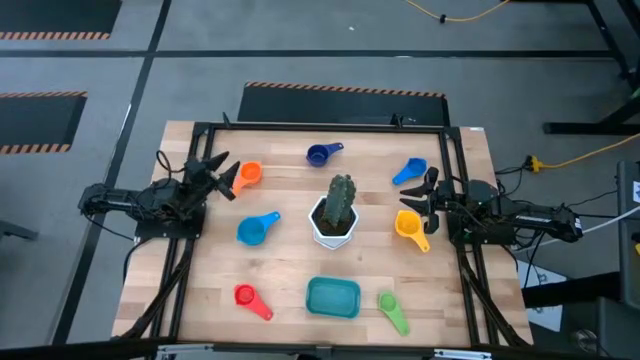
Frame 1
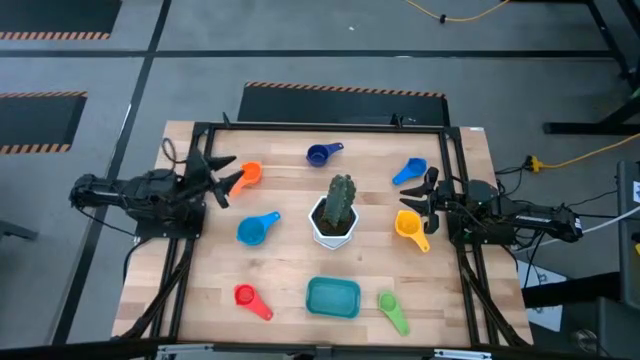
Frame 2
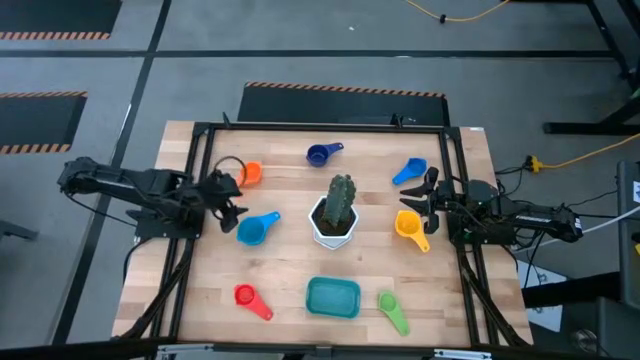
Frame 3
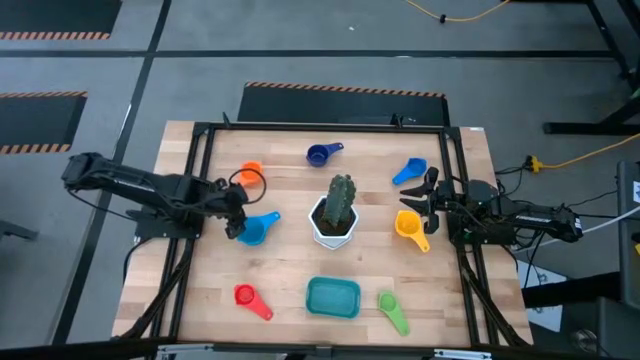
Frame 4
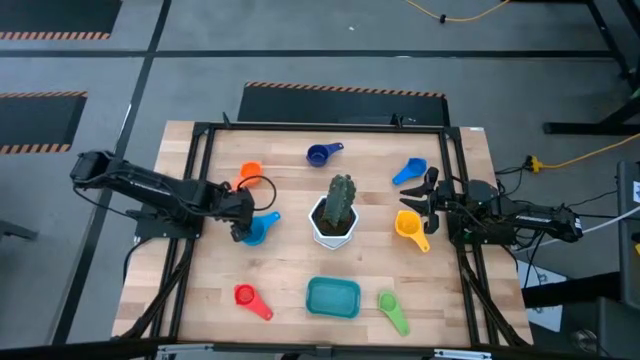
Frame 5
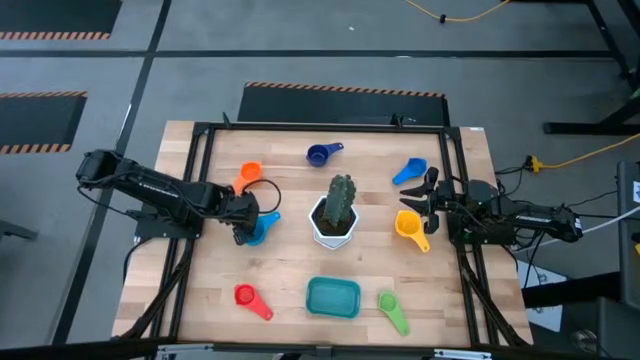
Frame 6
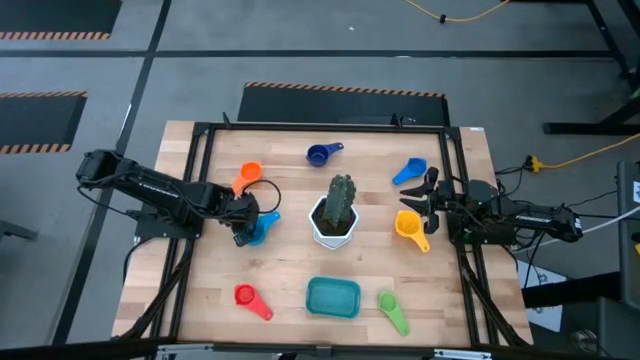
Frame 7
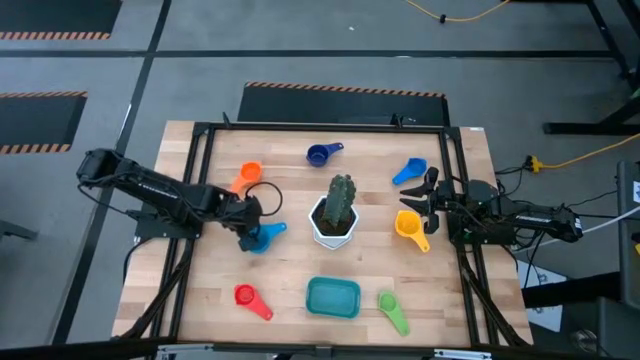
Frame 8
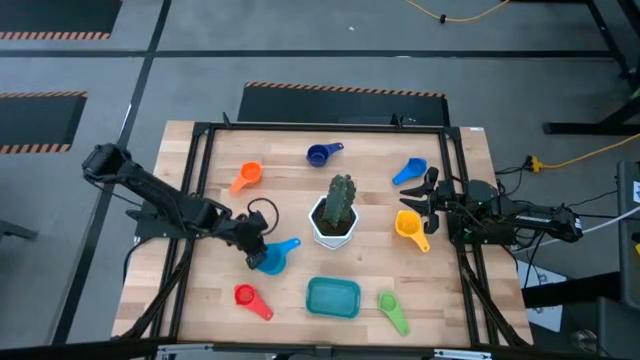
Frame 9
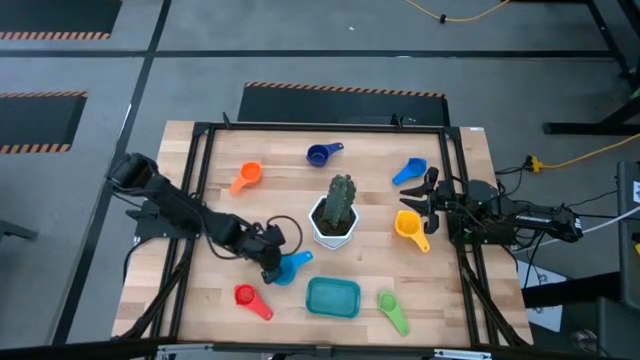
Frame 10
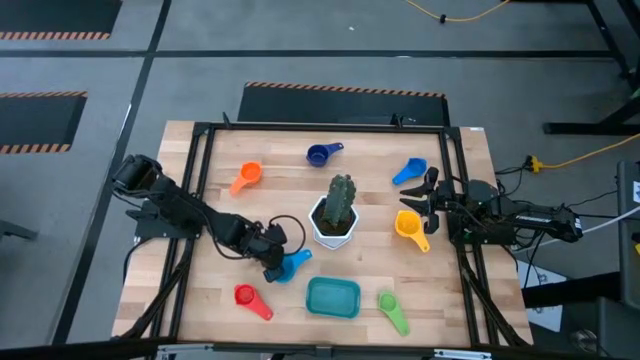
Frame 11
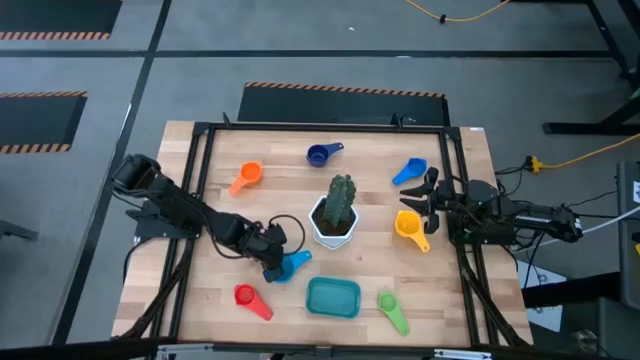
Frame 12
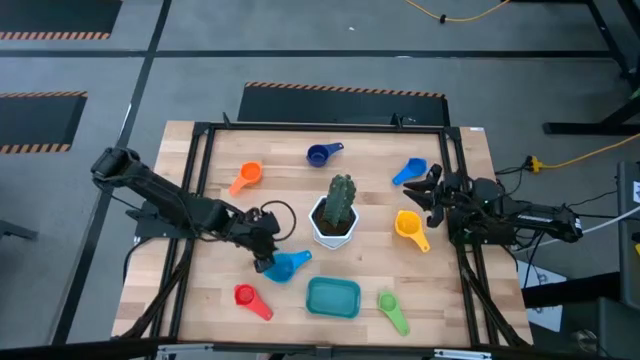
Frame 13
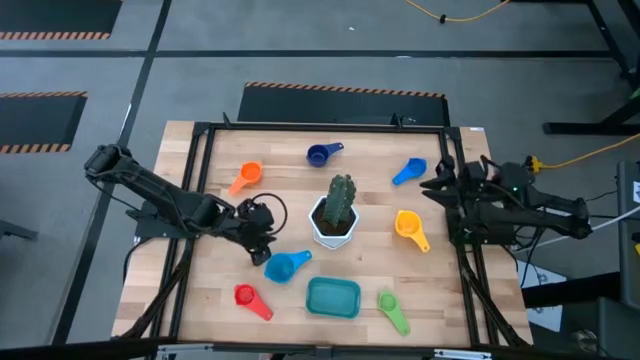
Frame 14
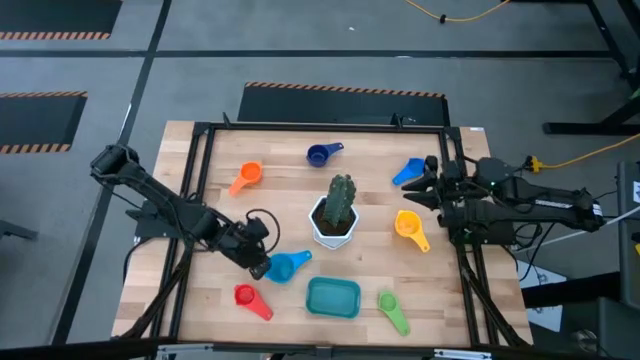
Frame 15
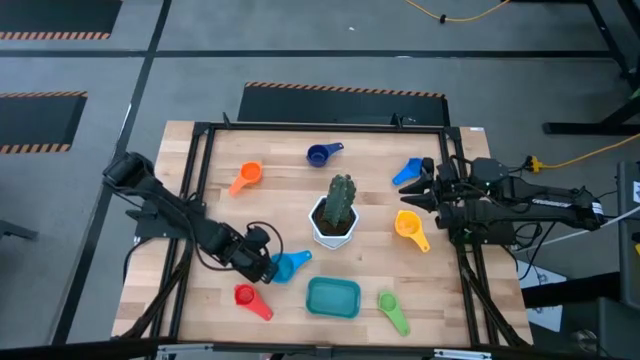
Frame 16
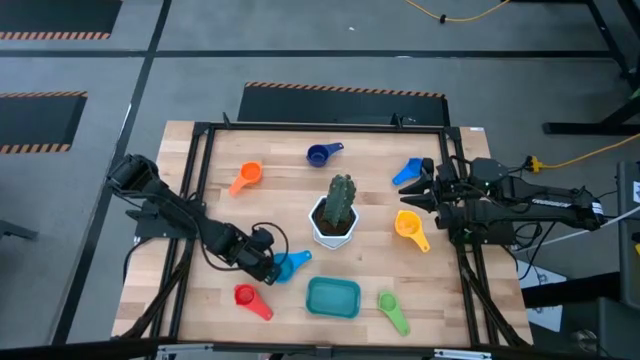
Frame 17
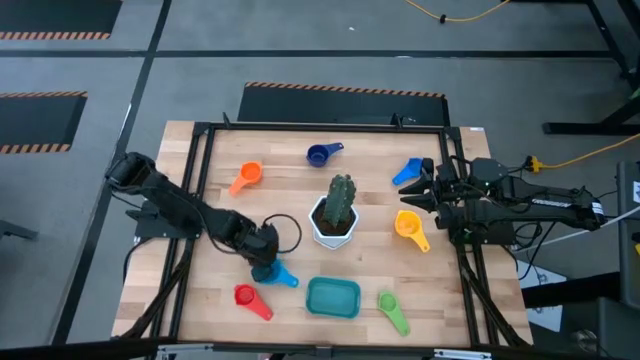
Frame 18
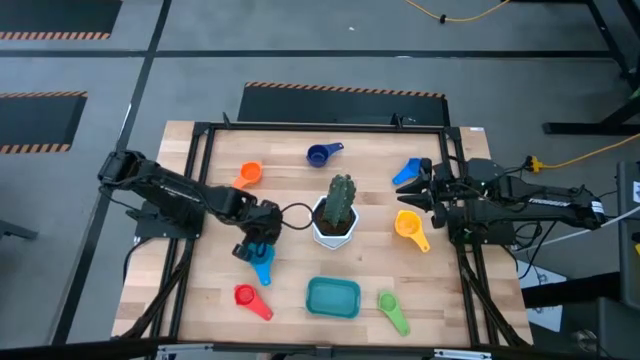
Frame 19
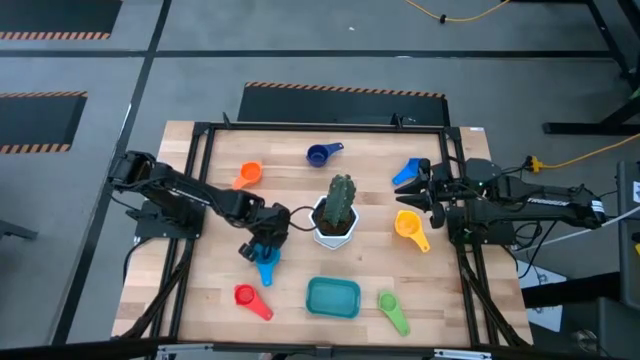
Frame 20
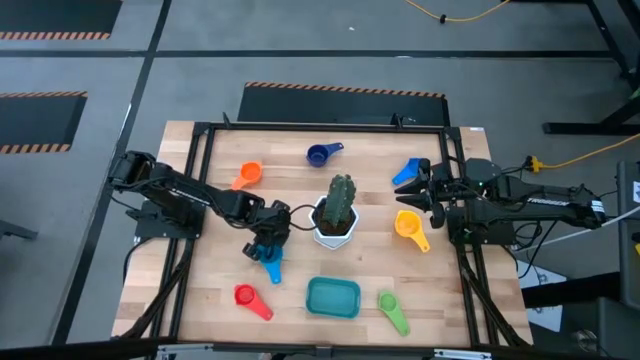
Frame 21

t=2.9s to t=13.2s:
Task: Nest measuring cups in basket
Adjust the light blue measuring cup

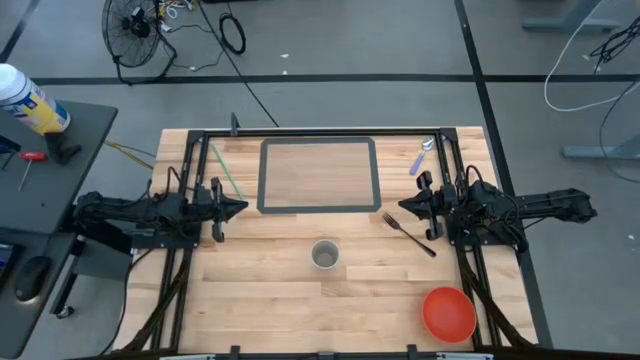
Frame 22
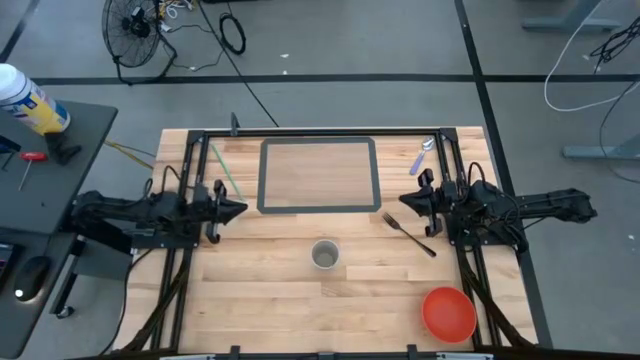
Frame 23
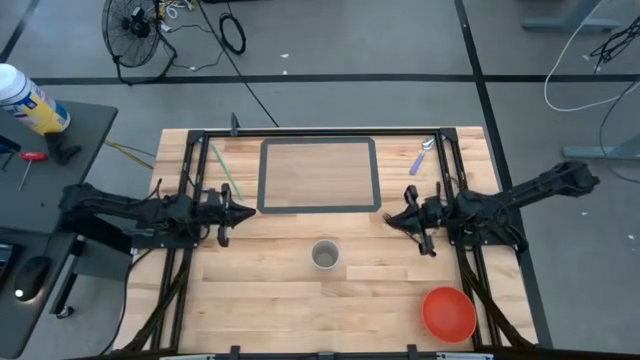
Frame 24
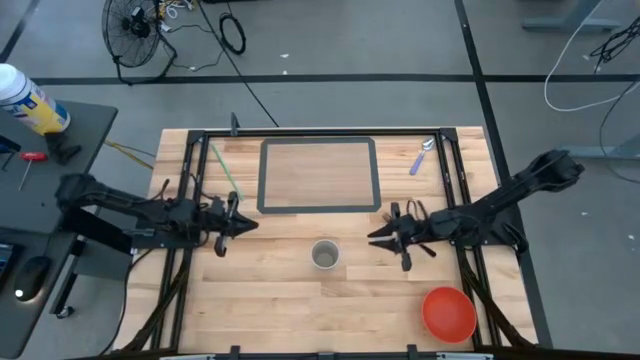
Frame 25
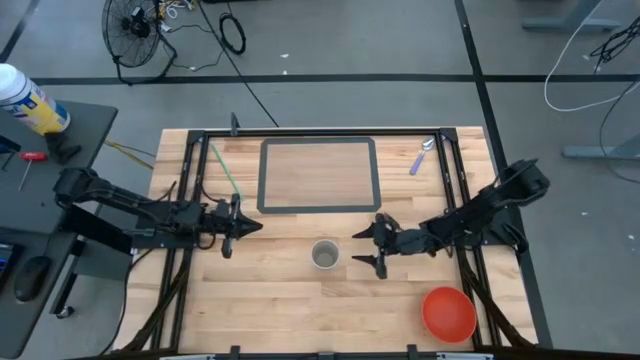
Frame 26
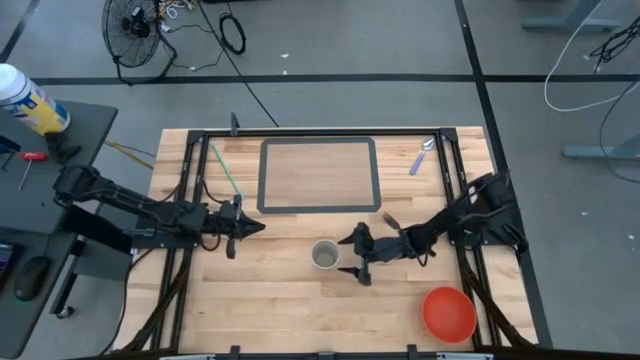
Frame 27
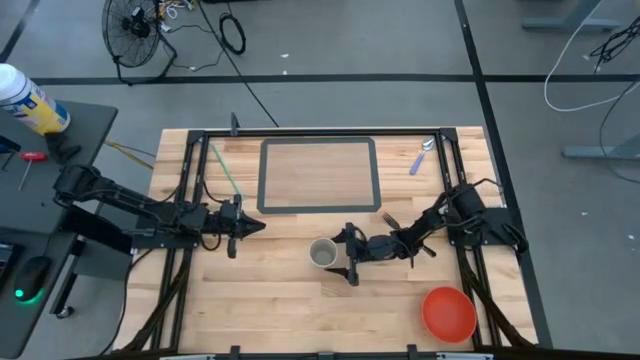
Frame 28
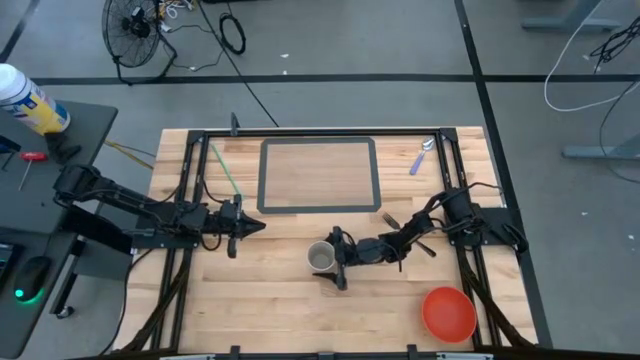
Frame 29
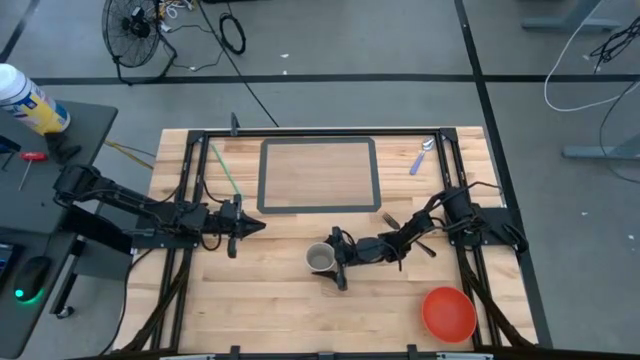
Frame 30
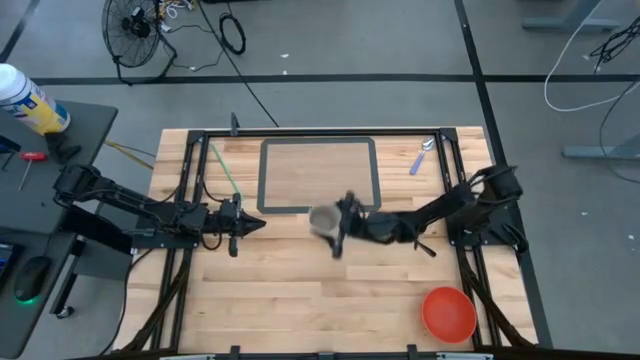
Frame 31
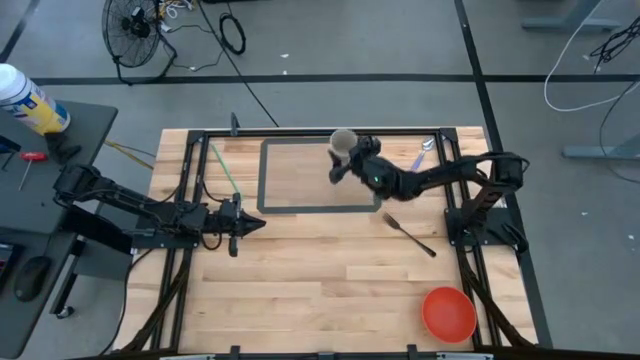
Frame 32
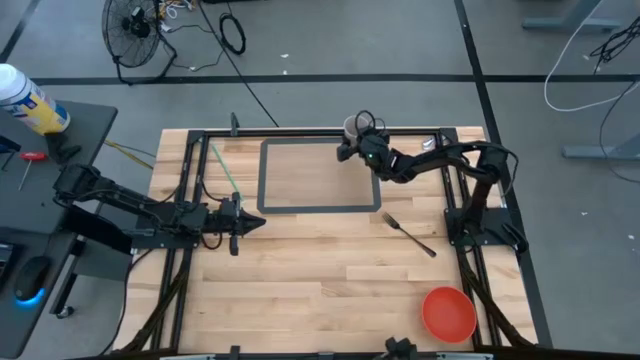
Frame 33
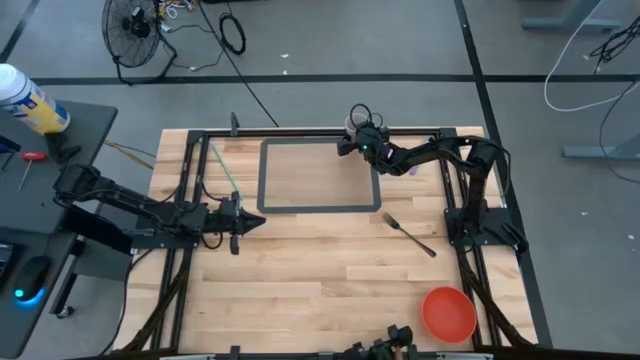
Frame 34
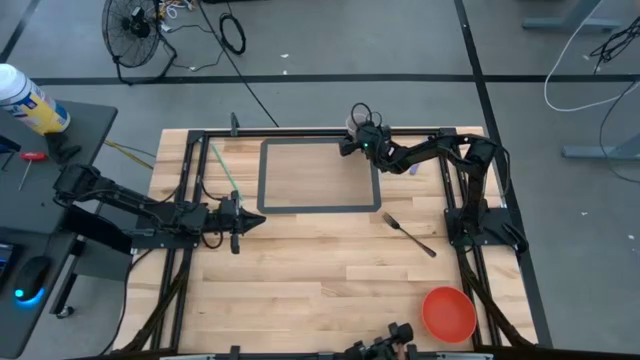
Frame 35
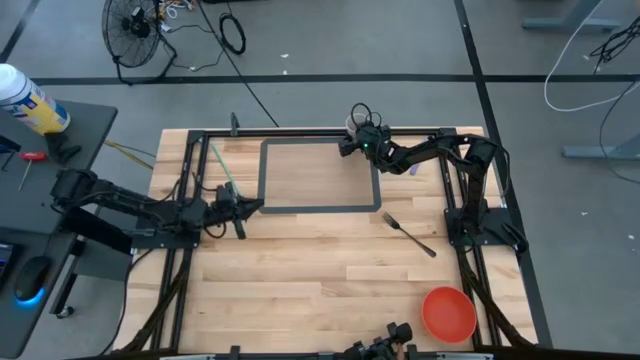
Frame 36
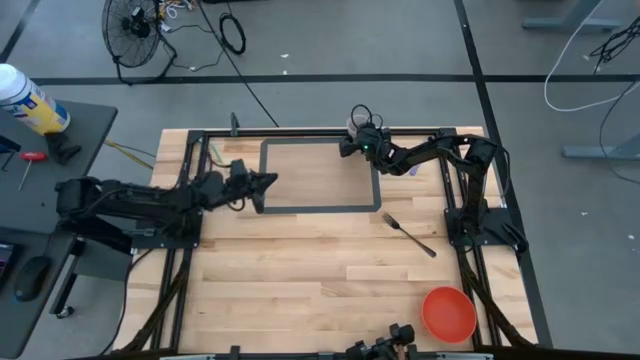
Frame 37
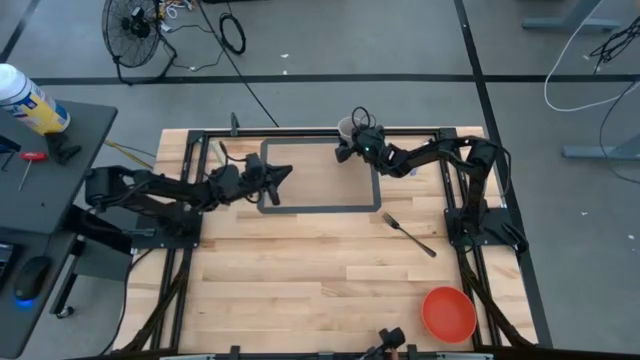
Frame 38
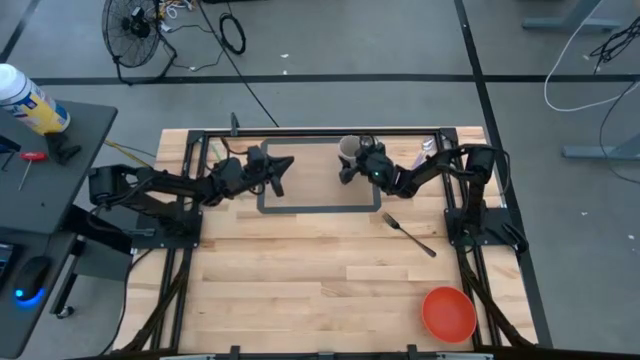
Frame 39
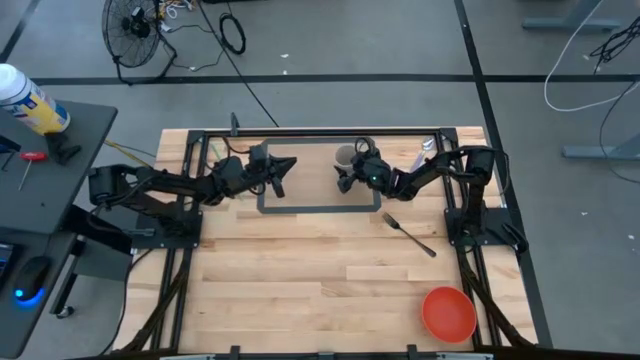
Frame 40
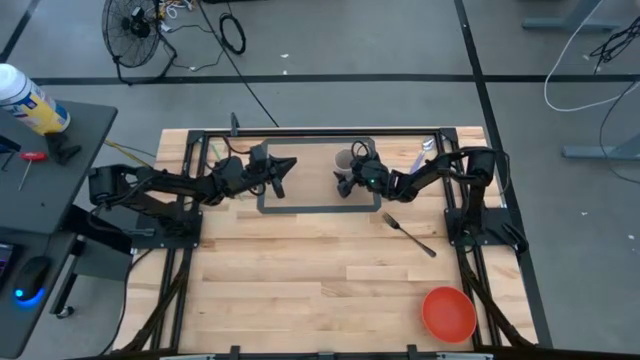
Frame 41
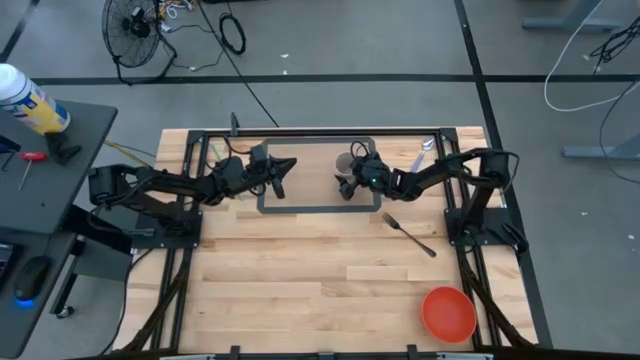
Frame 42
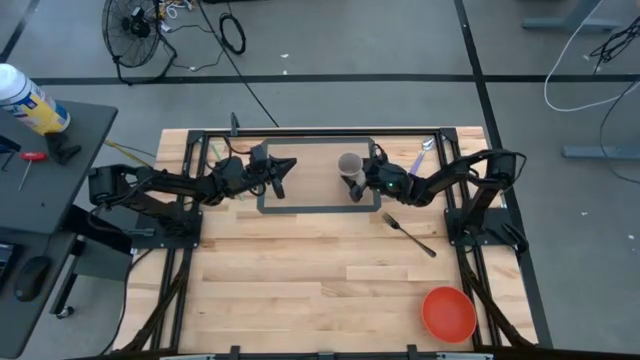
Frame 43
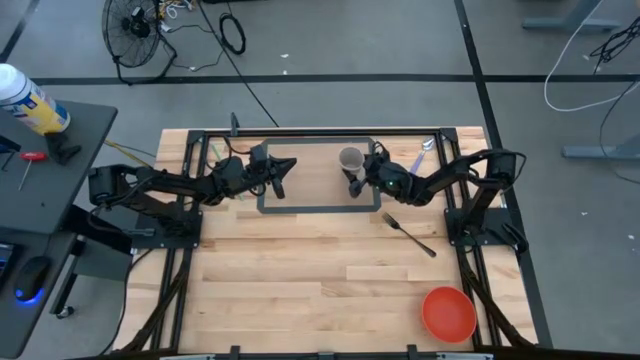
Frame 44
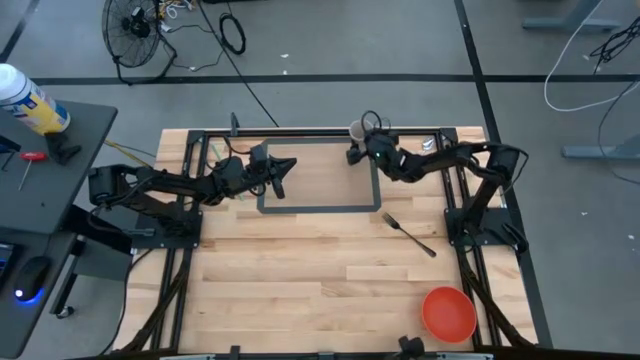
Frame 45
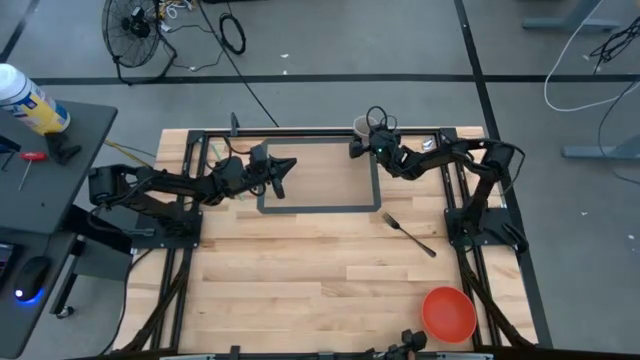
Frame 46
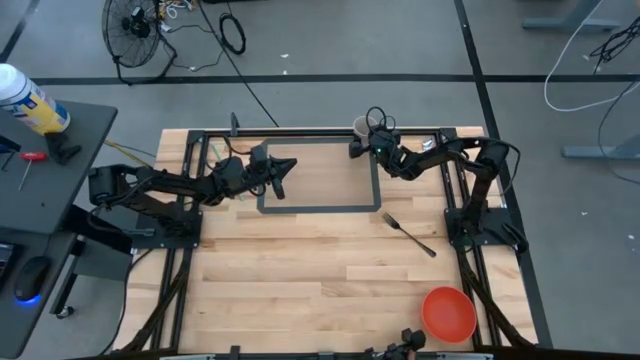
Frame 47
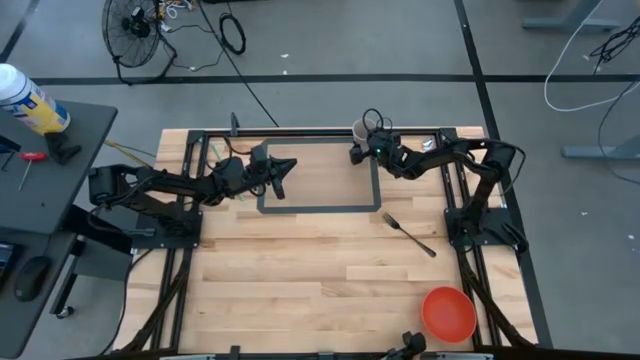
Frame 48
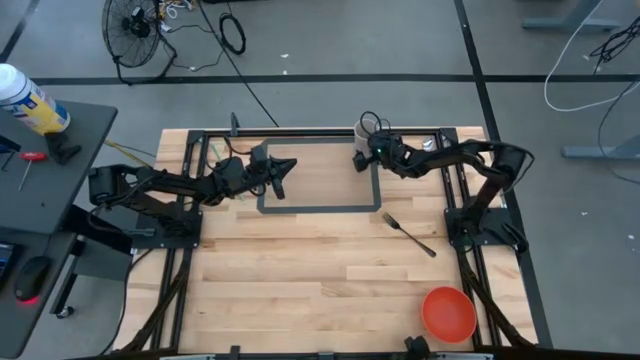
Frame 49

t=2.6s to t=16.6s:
Task: Pick & Place Utensil
Put the white cup on the transparent mat
